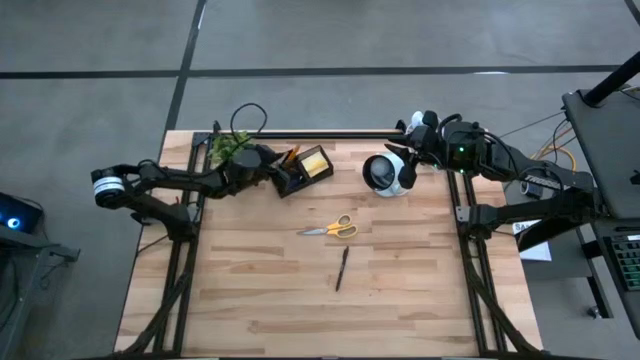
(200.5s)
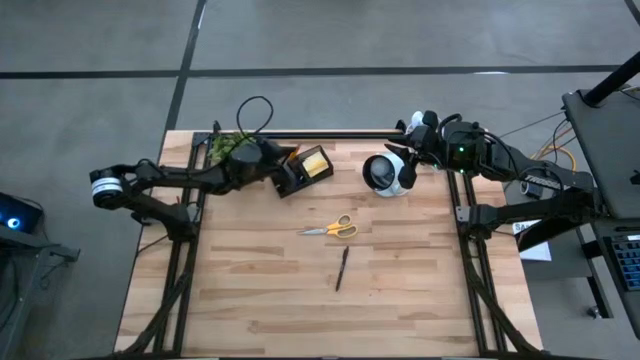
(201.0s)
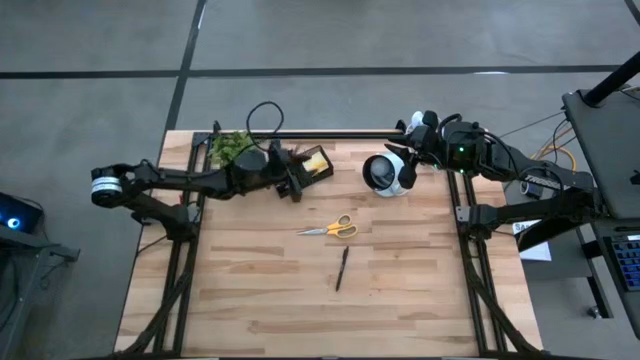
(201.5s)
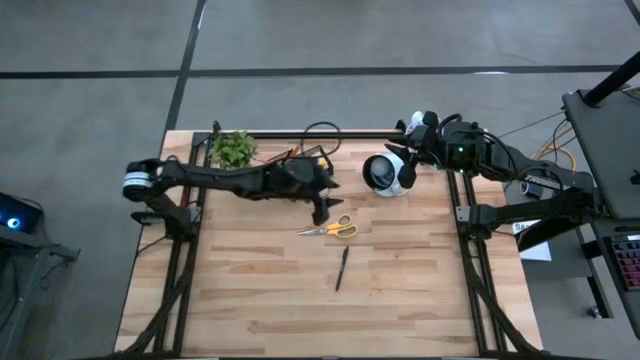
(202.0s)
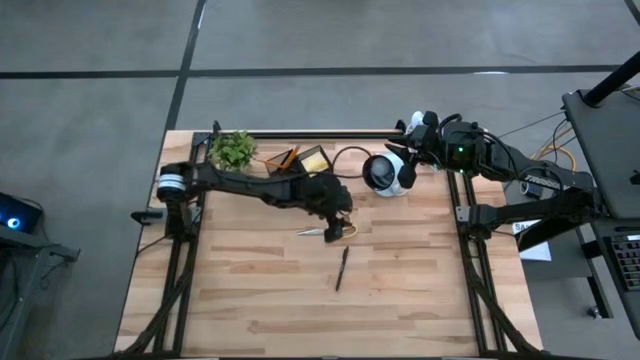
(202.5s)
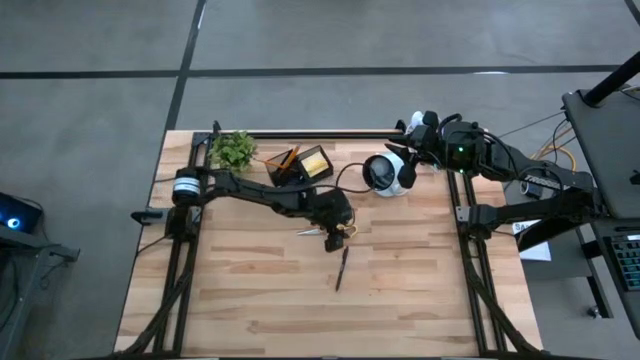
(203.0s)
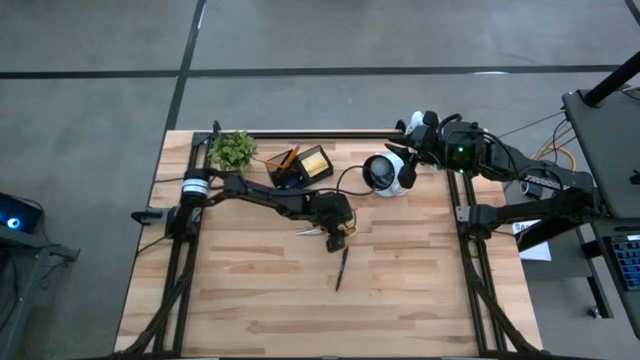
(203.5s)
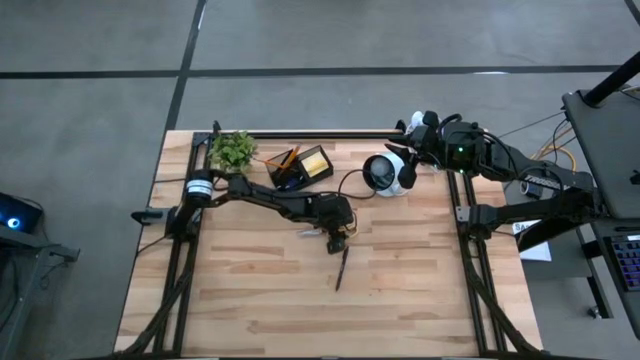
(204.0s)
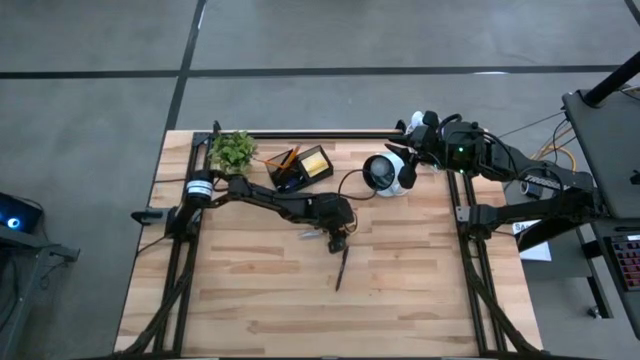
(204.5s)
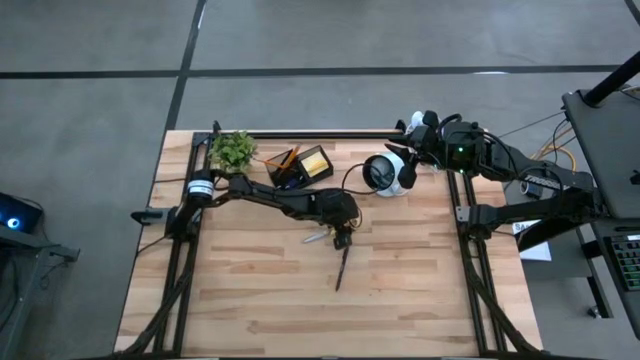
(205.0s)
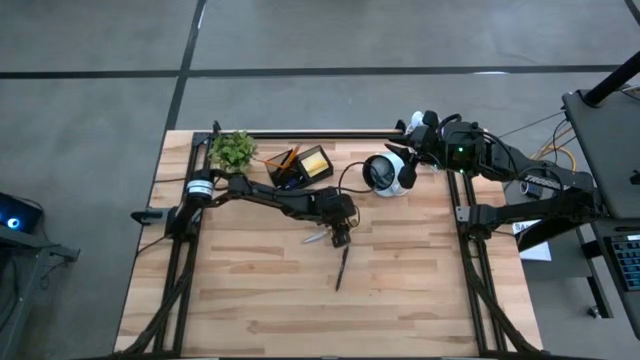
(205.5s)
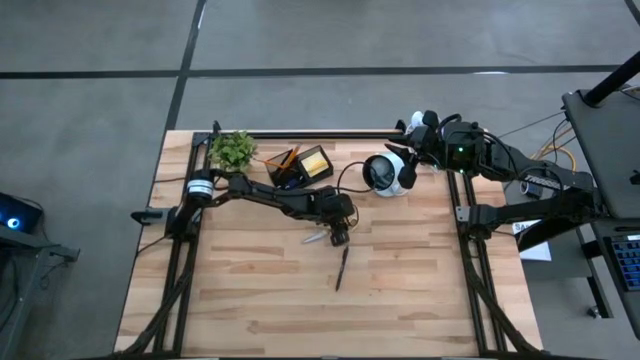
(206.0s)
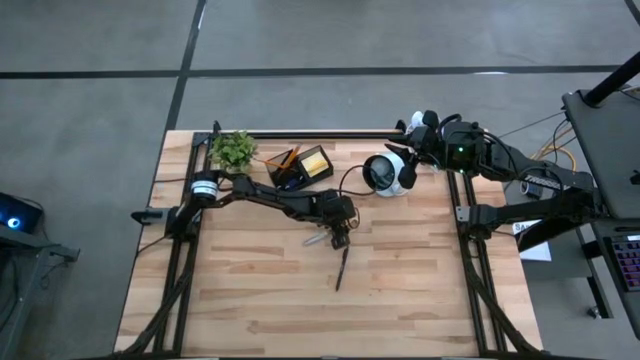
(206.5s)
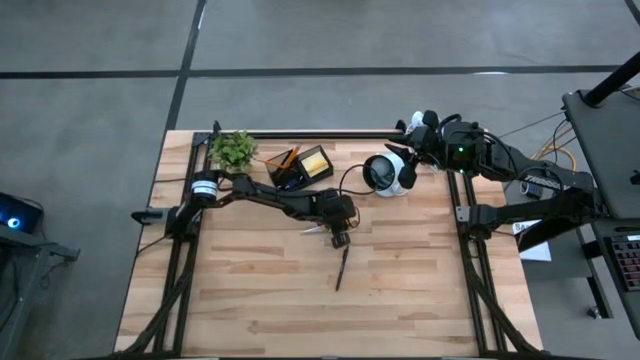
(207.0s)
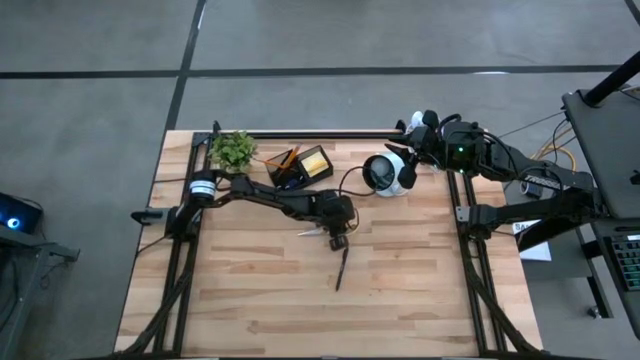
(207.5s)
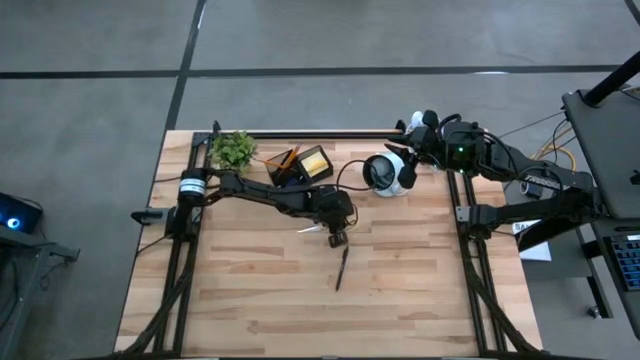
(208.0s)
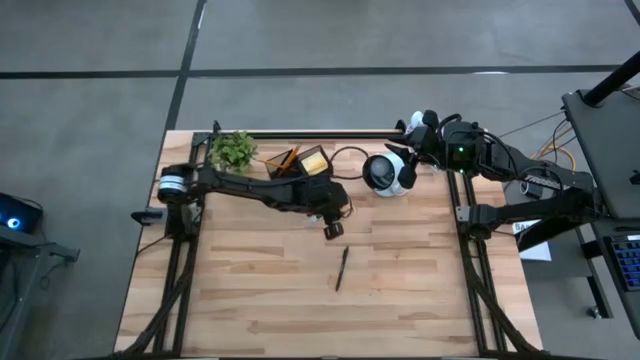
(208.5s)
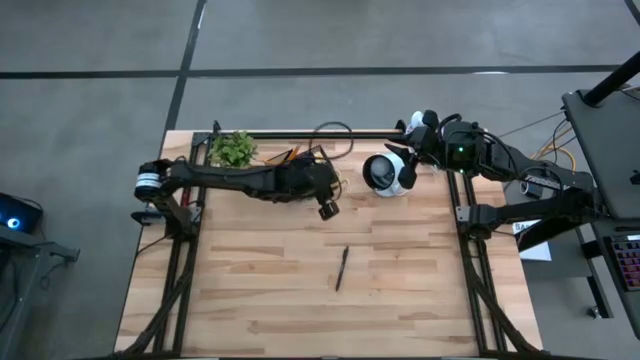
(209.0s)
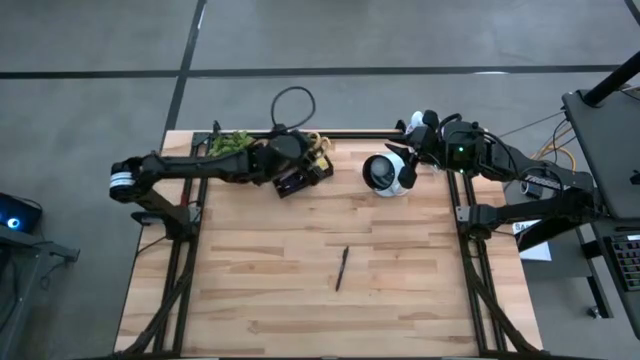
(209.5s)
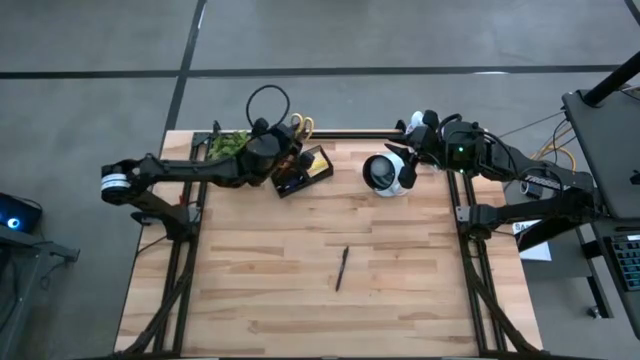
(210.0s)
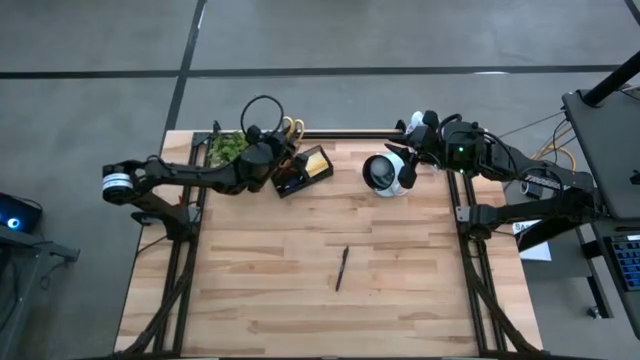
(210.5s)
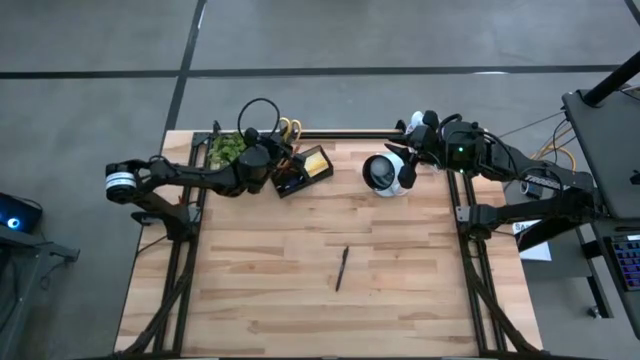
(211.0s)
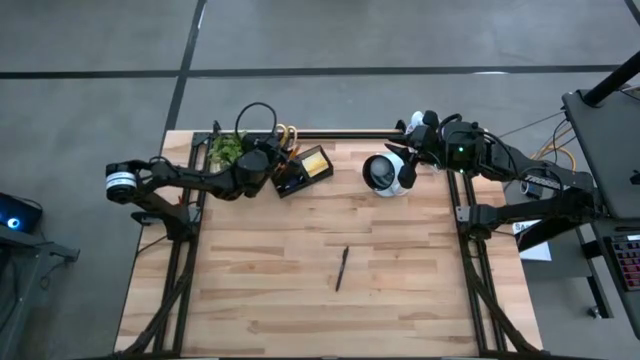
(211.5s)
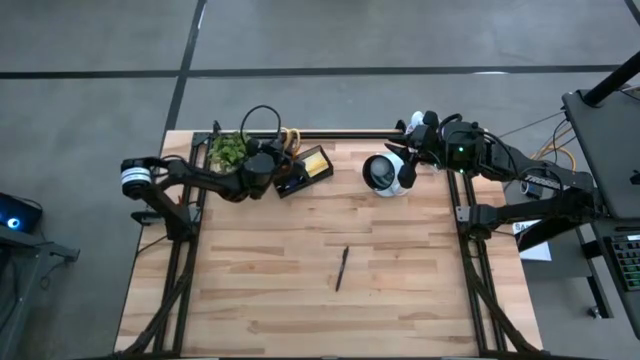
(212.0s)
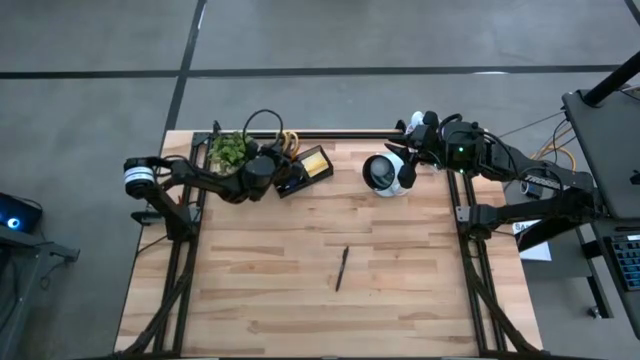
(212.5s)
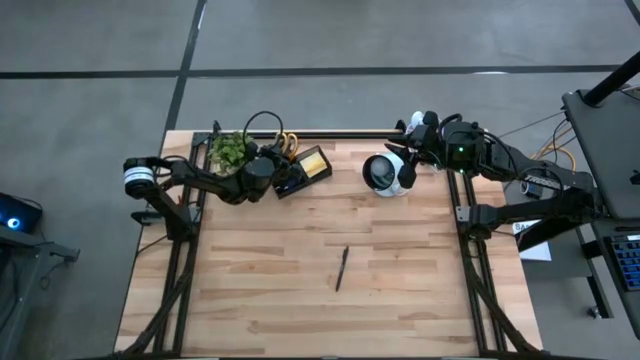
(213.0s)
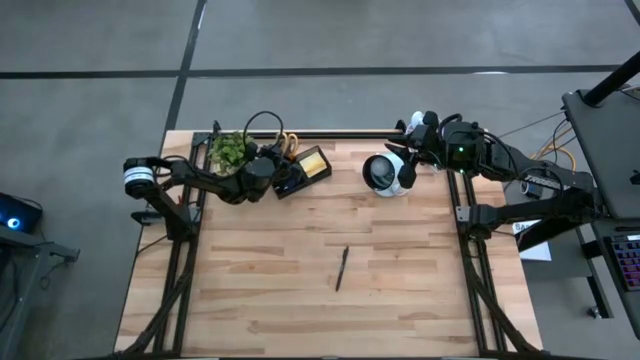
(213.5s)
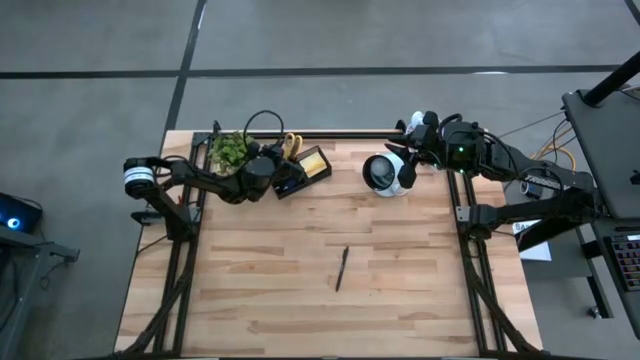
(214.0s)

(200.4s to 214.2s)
Task: Pick and place office supplies into organizer
Put the yellow scissors into the black desk organizer

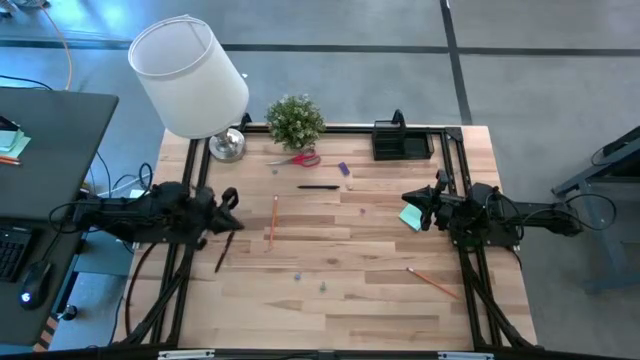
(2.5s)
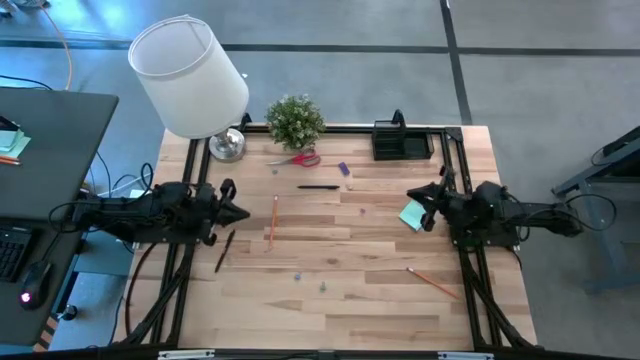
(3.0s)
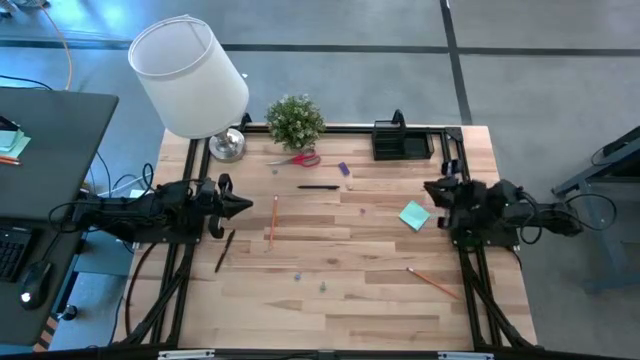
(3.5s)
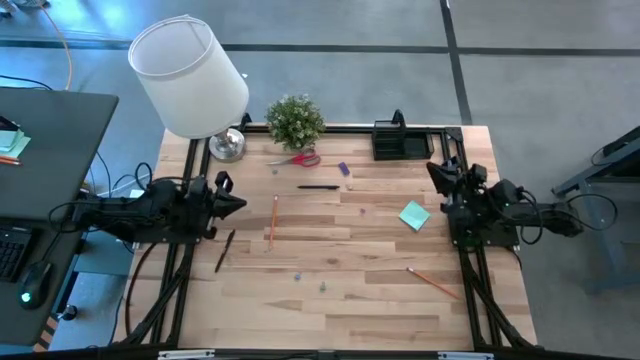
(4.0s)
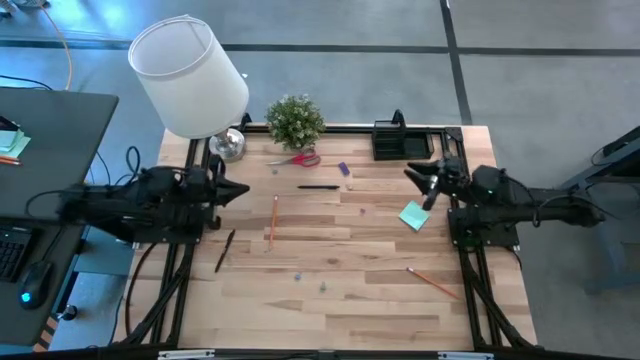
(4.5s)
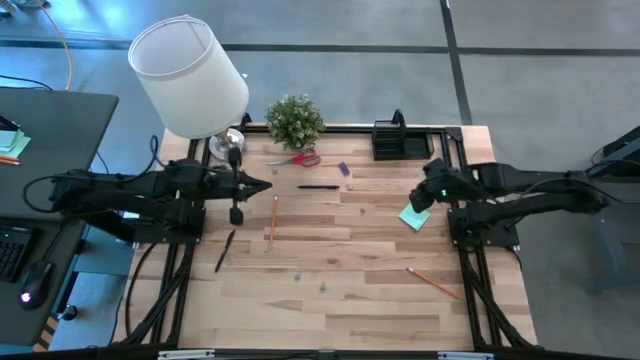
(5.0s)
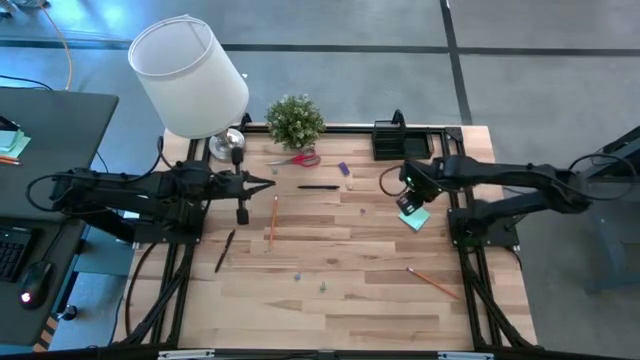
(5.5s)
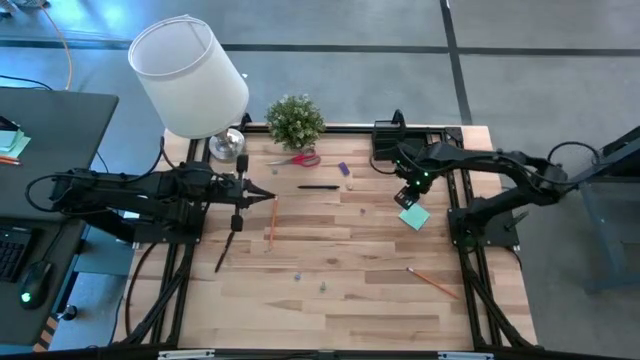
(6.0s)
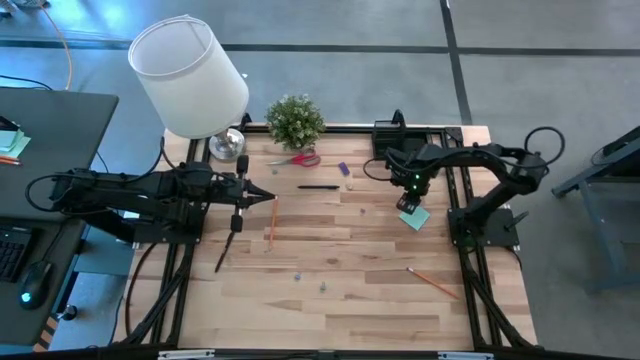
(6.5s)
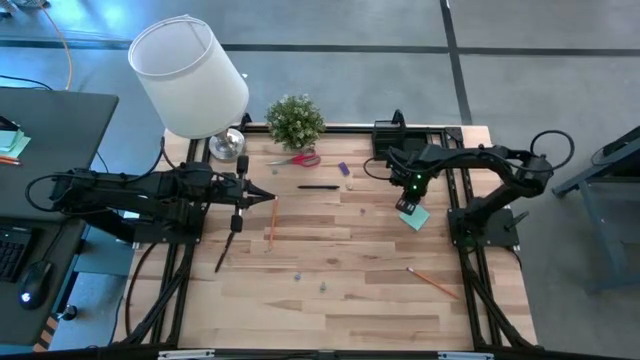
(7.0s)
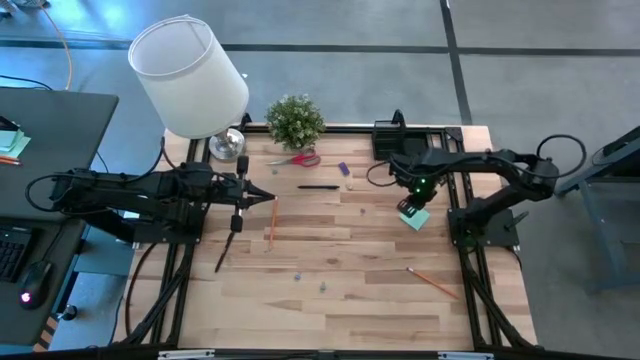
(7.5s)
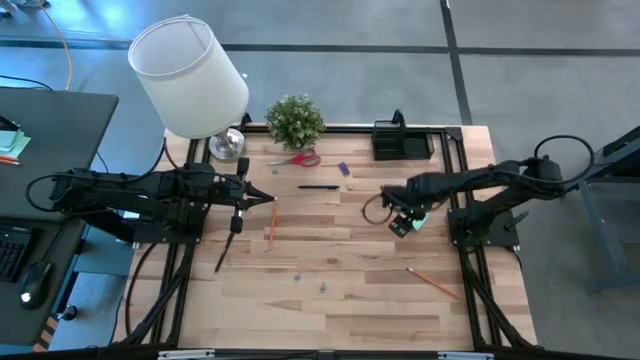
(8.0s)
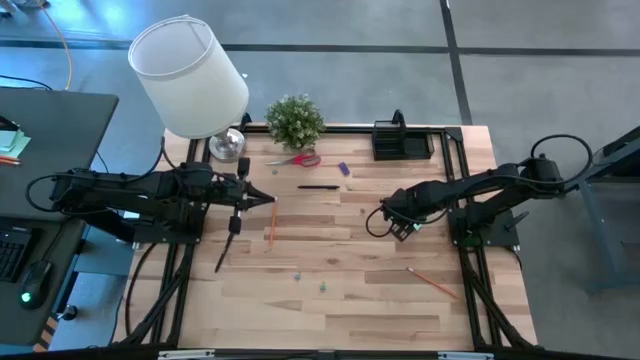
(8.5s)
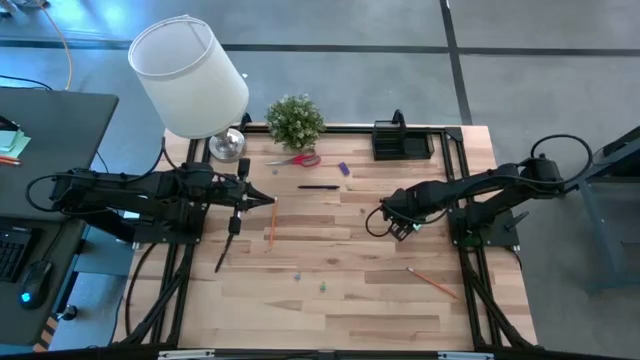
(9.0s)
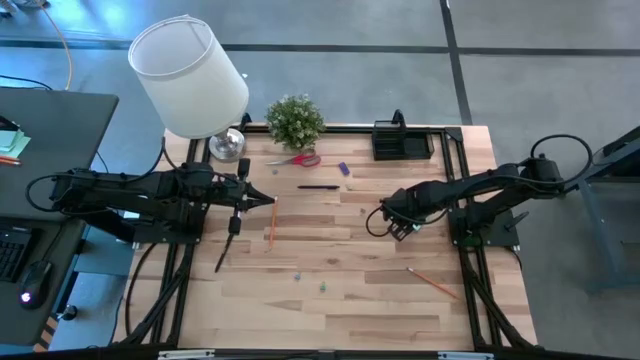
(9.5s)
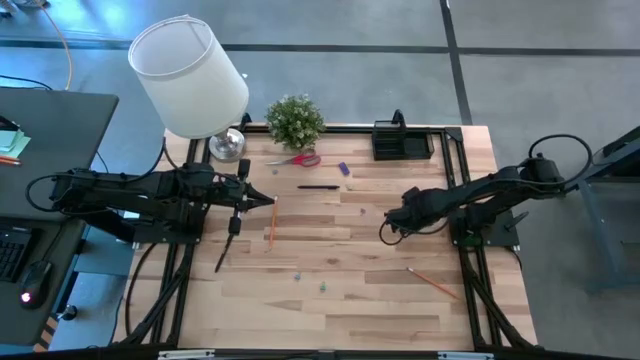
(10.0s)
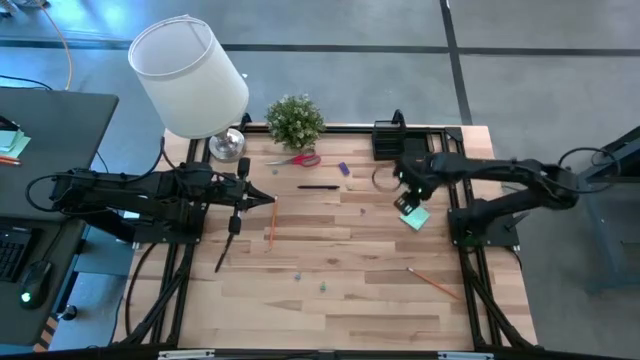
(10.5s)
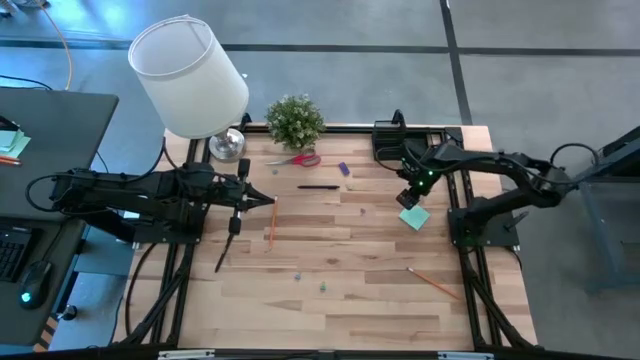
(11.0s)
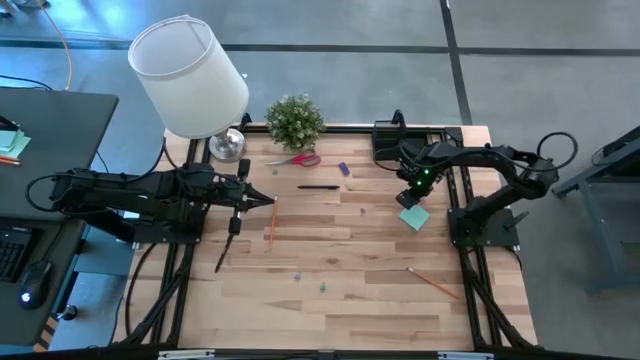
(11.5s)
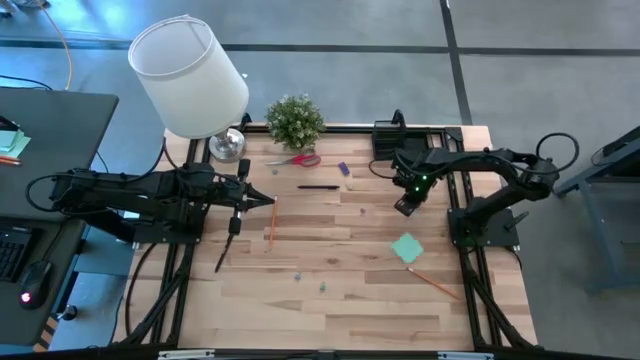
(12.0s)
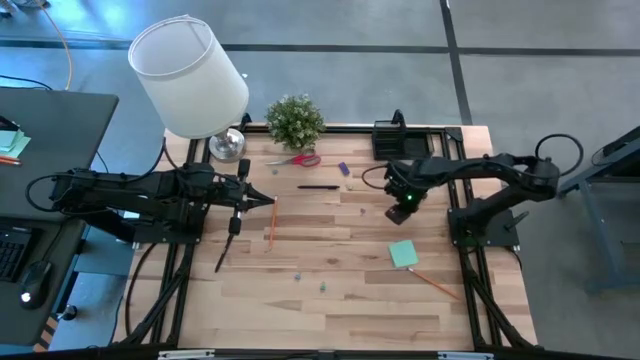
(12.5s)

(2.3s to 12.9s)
Task: Pick and place office supplies into organizer
Put the blue sticky notes in the black desk organizer
